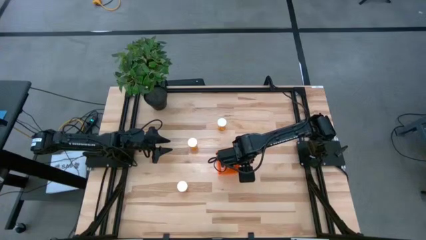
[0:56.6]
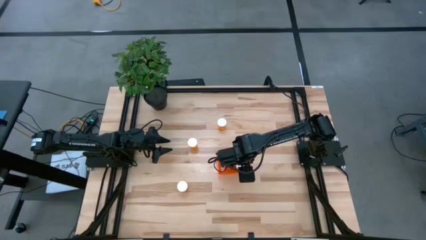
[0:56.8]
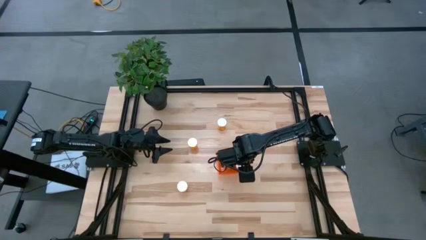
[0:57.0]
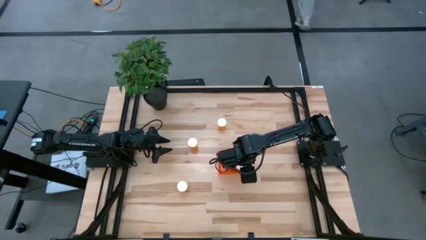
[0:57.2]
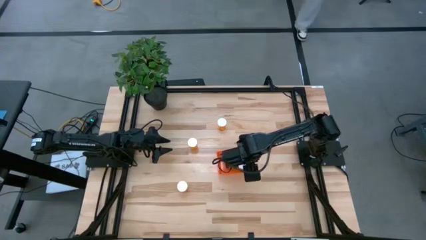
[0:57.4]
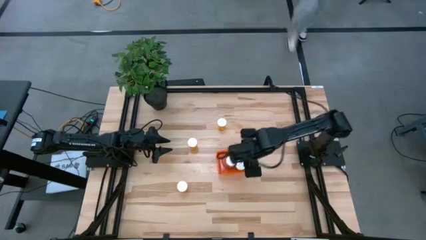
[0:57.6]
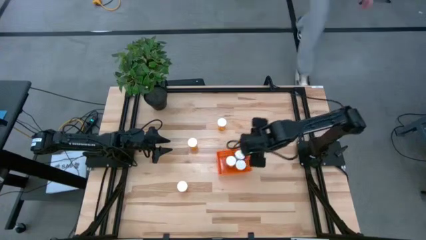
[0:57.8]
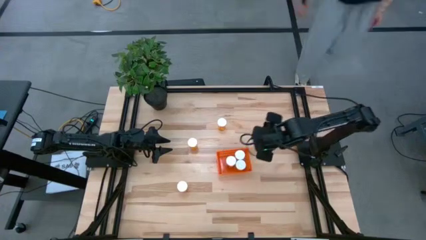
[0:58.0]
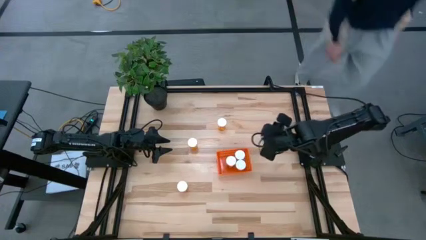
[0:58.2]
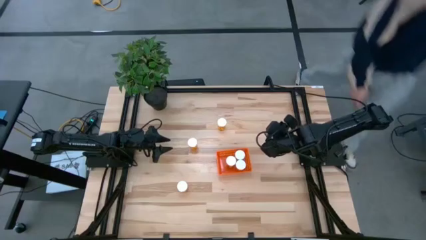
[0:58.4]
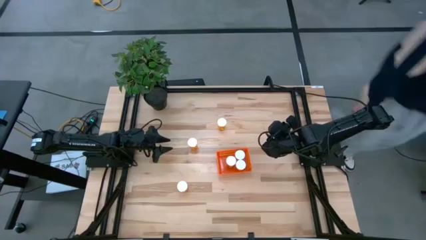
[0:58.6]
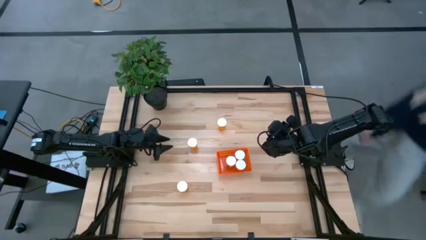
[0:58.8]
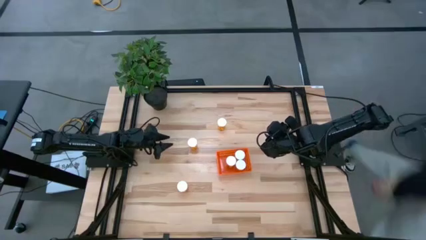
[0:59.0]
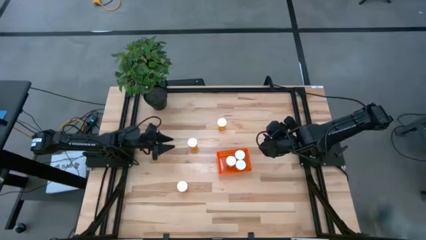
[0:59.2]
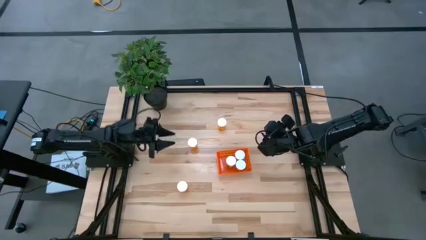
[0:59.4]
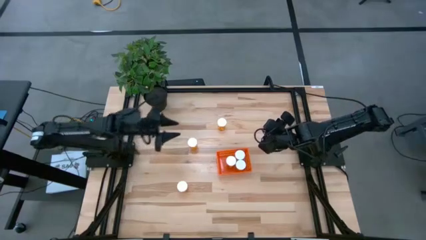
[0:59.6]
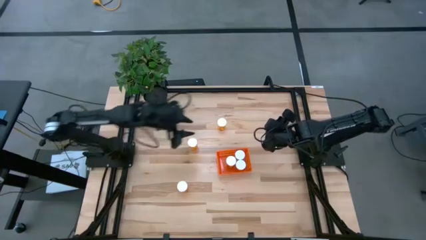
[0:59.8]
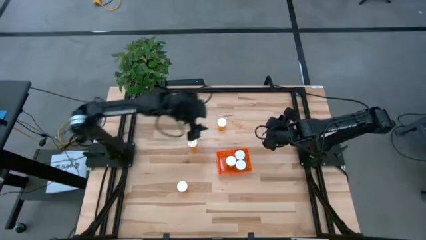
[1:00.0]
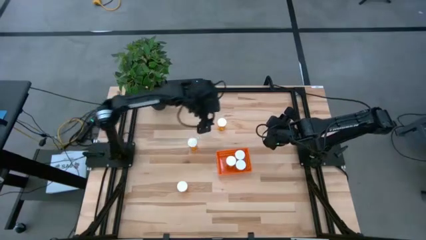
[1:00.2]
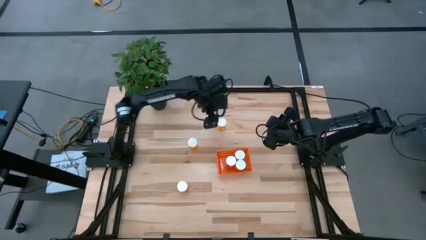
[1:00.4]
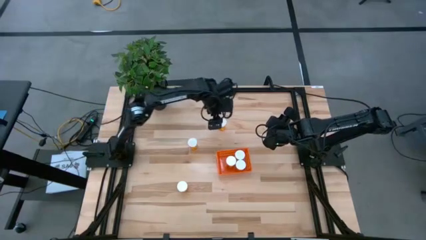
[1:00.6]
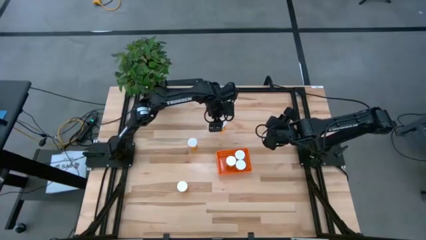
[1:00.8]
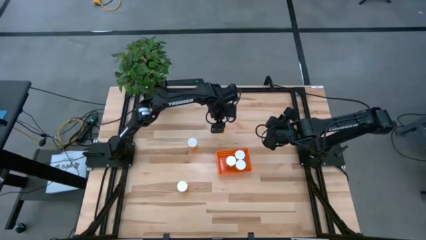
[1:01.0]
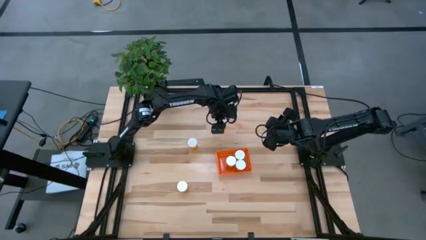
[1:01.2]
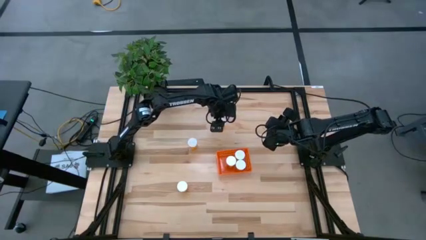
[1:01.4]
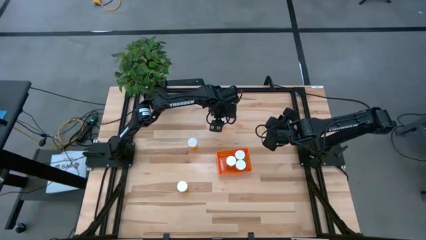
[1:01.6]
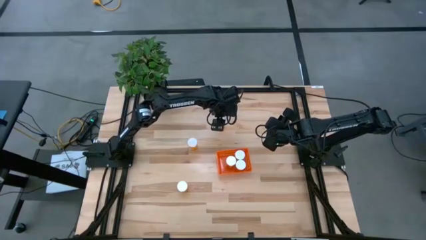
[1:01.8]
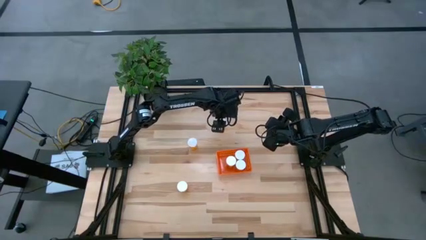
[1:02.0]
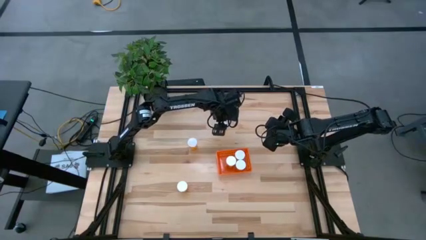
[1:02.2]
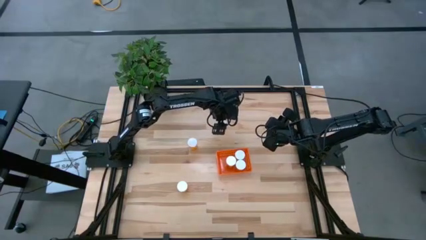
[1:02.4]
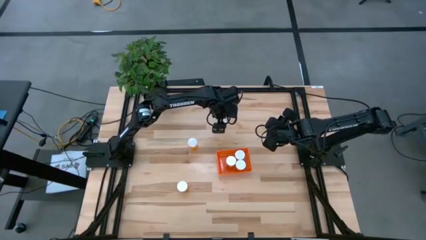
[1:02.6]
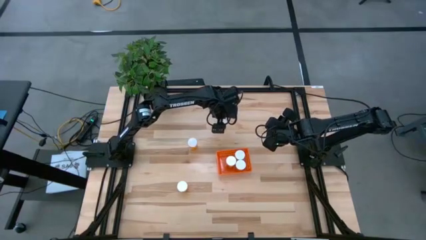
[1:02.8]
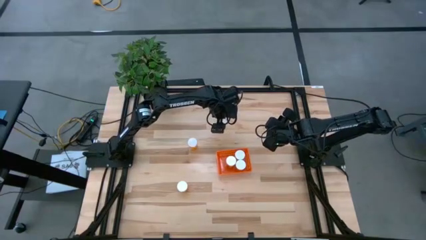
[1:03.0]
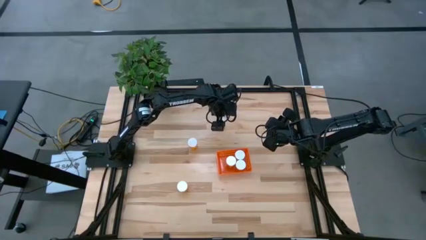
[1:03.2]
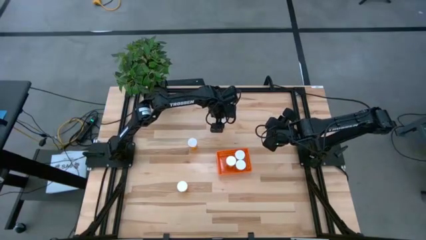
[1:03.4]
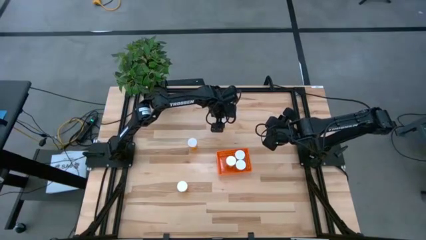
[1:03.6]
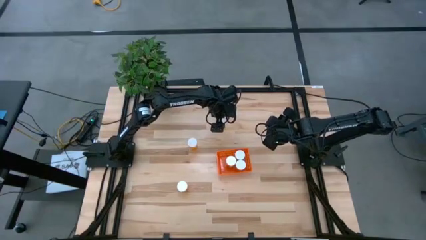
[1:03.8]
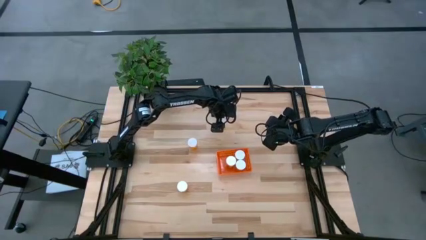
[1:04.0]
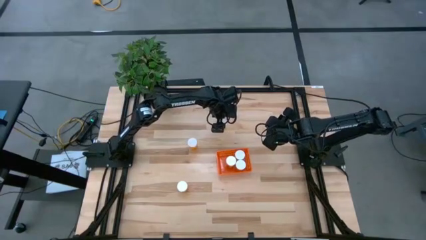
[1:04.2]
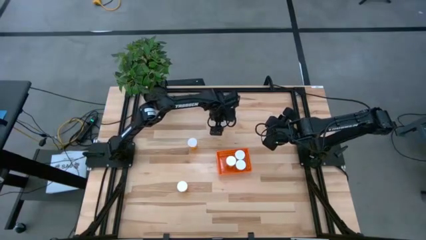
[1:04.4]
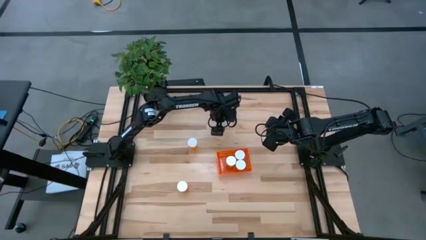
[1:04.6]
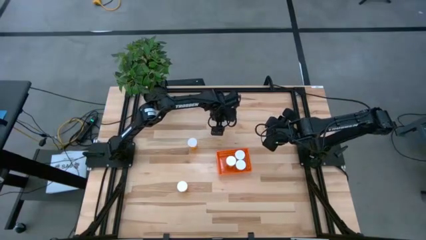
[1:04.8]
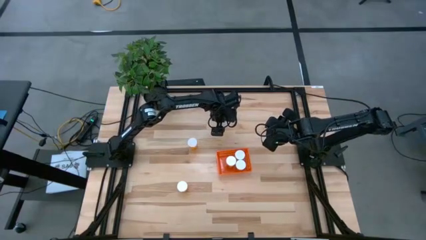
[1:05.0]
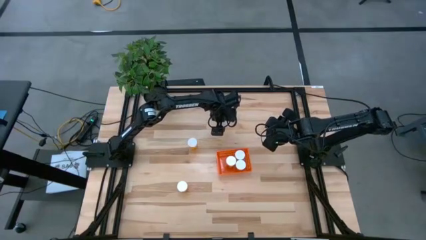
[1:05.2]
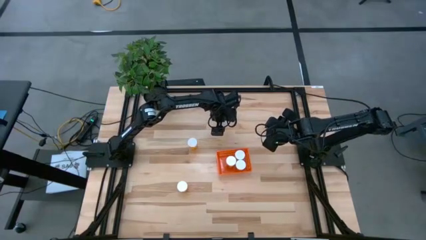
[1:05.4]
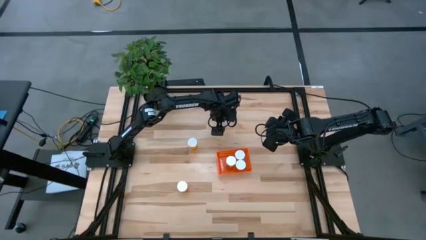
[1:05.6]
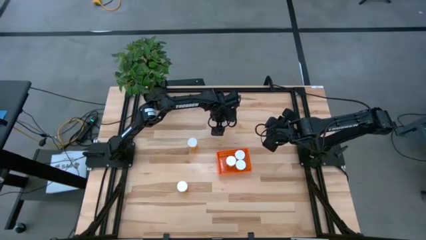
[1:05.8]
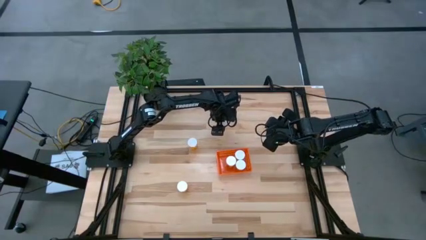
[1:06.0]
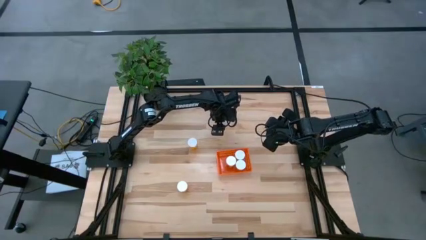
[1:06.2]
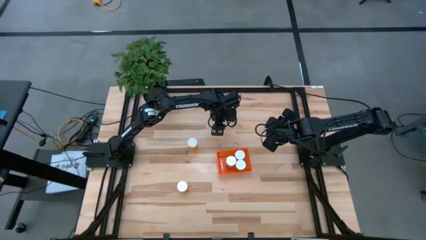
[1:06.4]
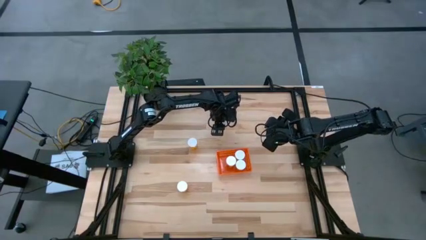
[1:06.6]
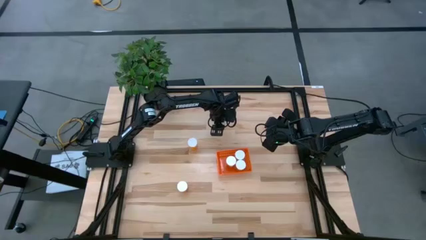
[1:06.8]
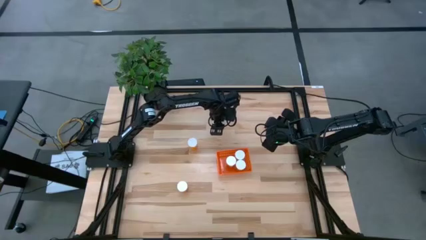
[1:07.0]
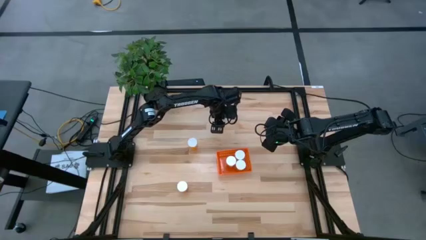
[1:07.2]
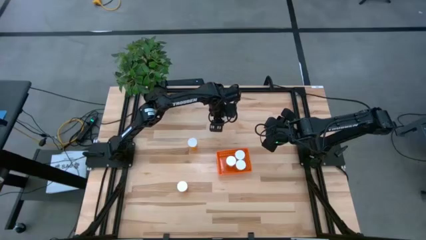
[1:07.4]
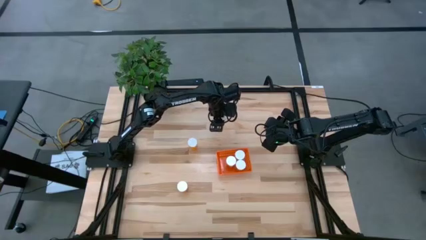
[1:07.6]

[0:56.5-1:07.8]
Task: Pick and place pill bottles into a basket
Put the orange pill bottle into the orange bin

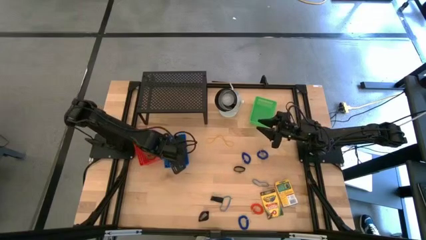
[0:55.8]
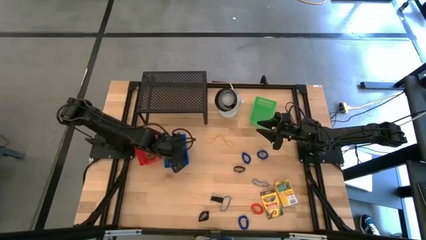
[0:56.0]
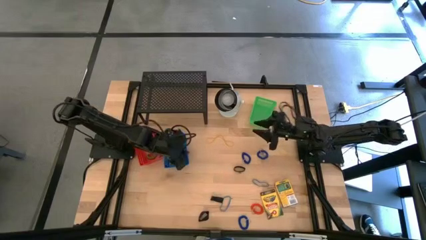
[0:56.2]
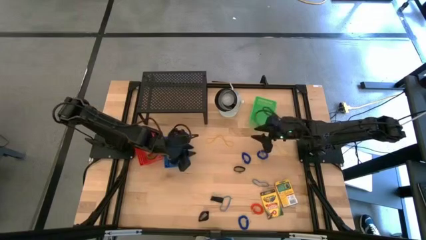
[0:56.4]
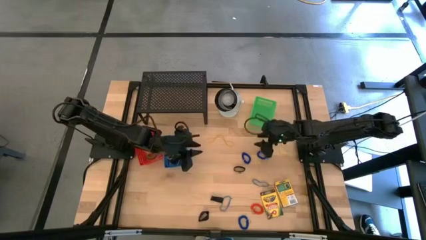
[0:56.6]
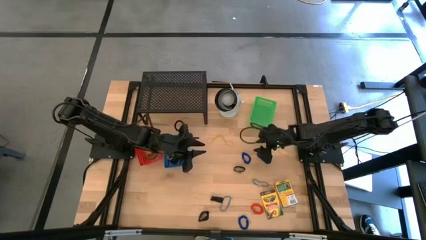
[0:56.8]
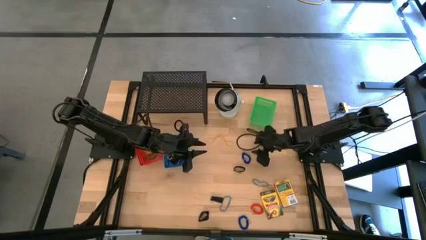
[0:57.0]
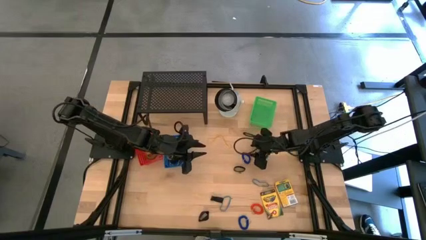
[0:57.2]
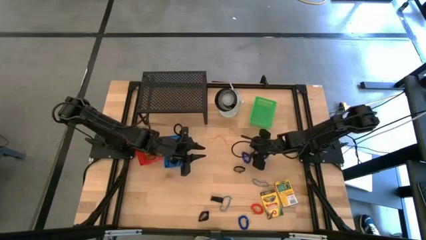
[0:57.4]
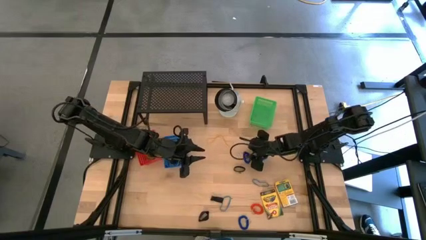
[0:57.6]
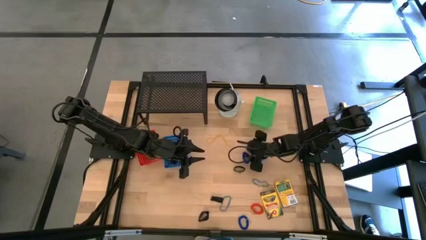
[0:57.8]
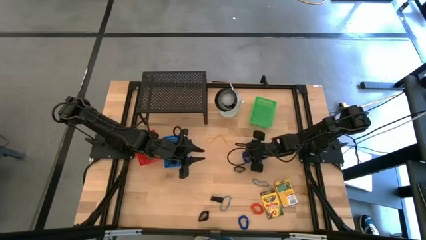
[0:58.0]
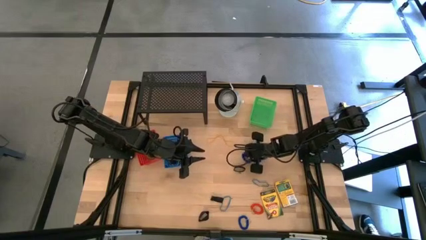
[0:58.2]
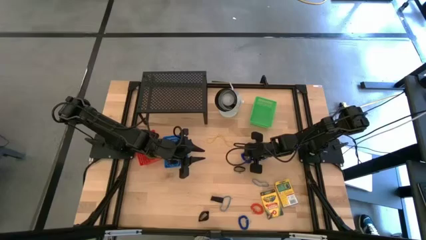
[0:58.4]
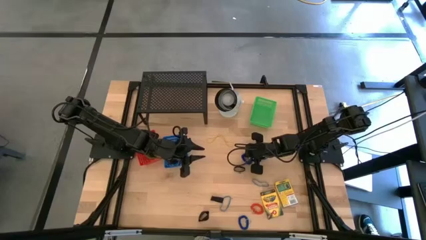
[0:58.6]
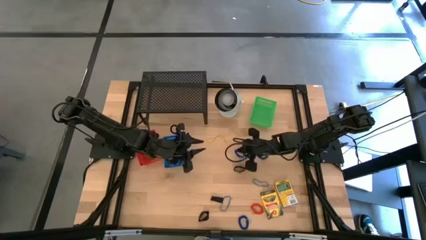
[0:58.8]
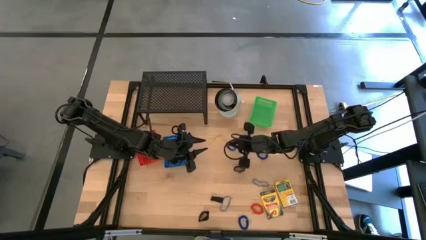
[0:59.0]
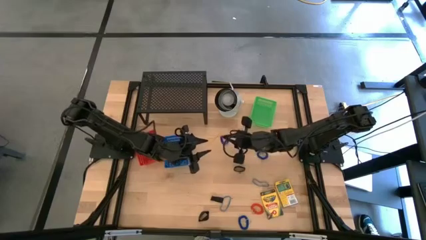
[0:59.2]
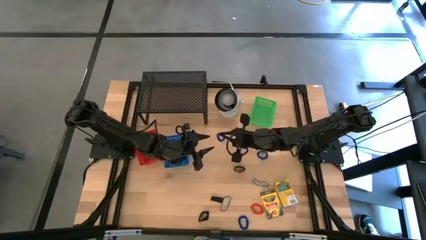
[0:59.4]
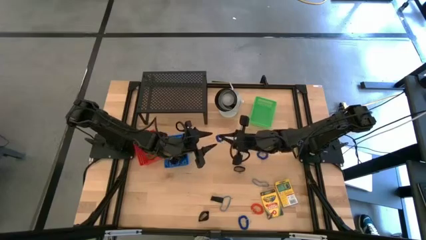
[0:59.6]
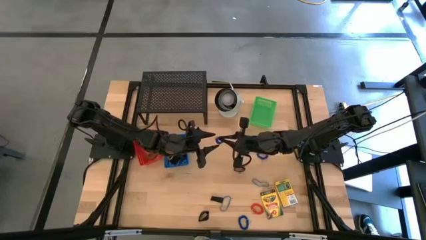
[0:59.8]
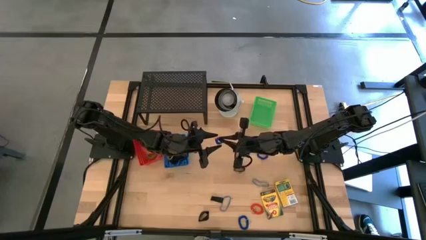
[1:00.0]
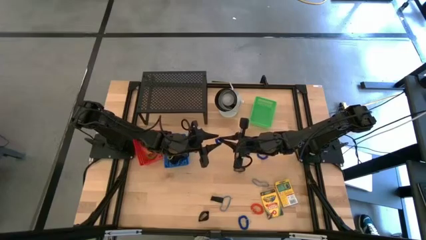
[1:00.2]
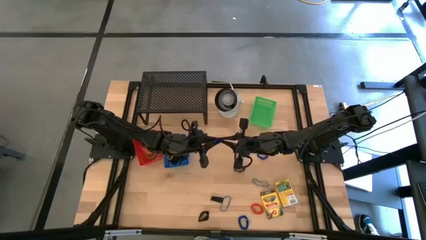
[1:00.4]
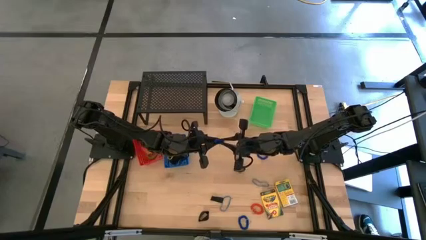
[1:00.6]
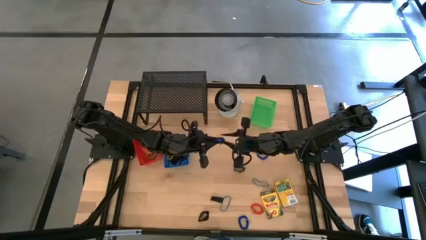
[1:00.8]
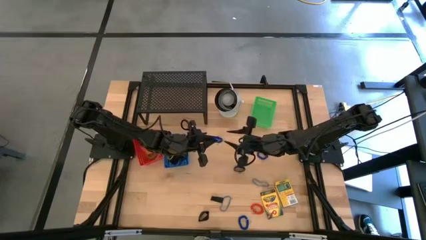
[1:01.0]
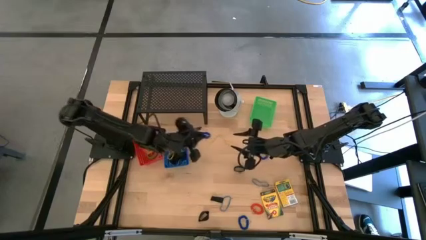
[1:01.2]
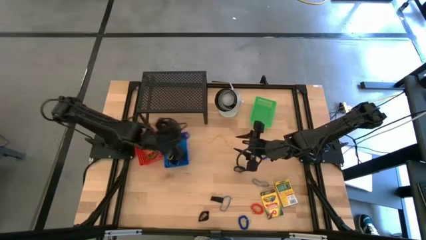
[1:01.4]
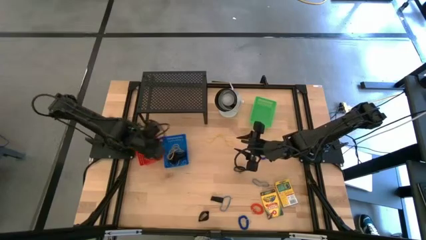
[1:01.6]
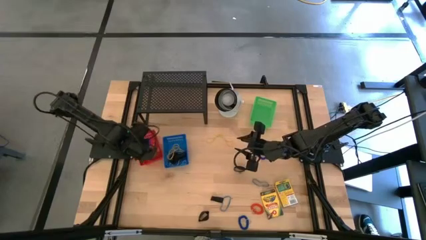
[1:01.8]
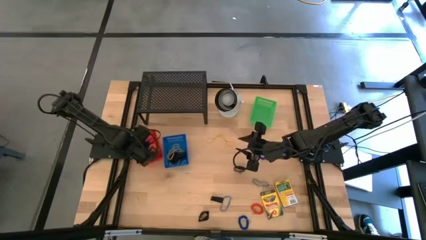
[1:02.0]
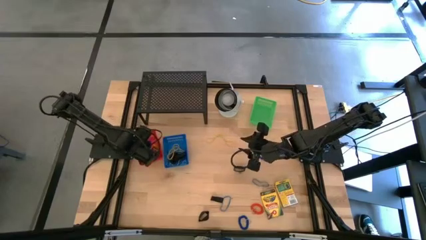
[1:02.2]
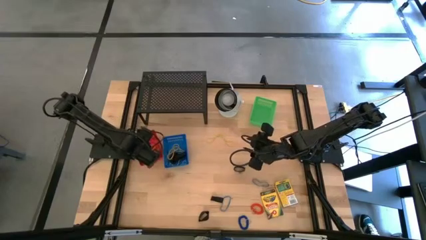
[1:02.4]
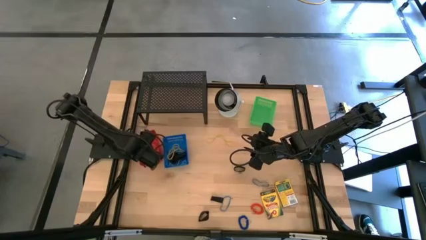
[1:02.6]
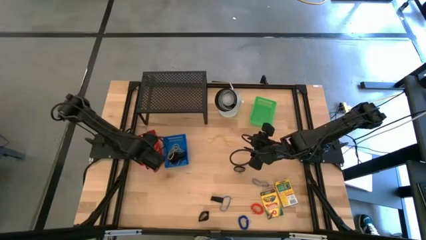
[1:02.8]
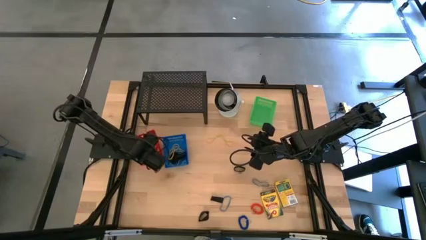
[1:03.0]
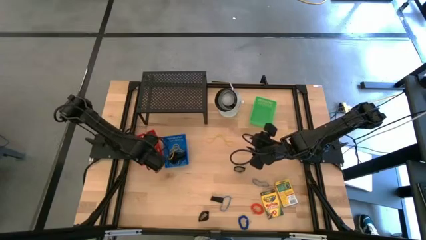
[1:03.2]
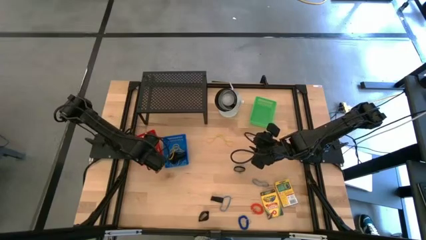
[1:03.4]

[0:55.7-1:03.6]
Task: Pick & Place Office Desk Supplies
Put the blue spring keychain into the red bin
